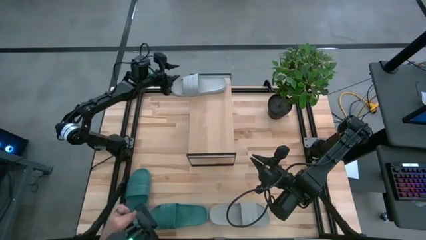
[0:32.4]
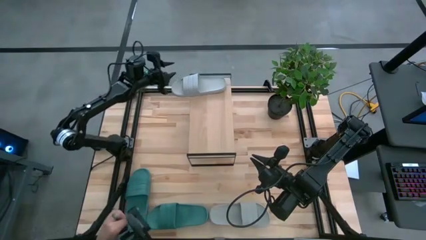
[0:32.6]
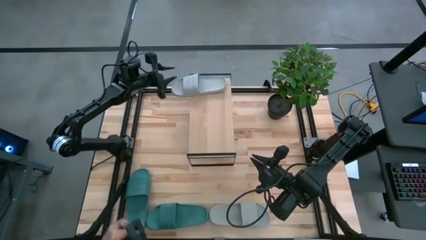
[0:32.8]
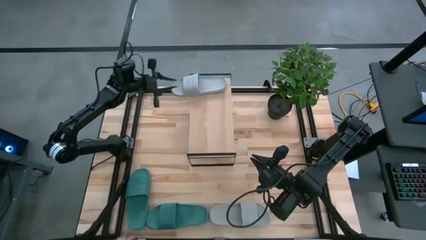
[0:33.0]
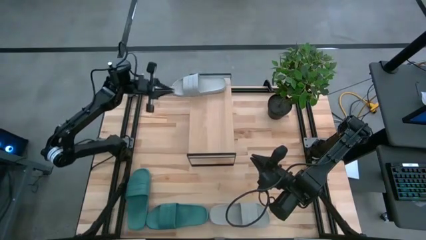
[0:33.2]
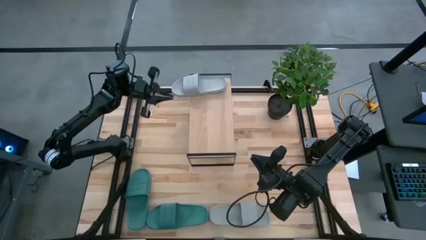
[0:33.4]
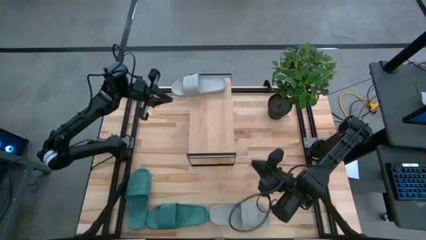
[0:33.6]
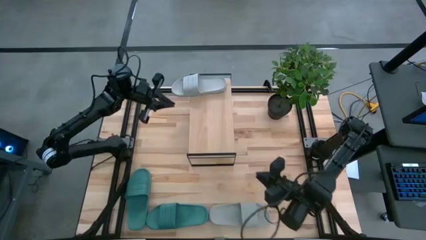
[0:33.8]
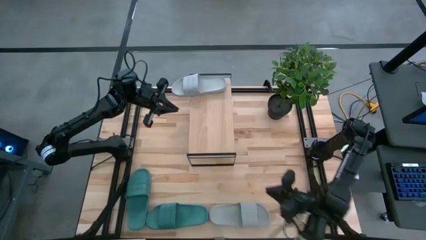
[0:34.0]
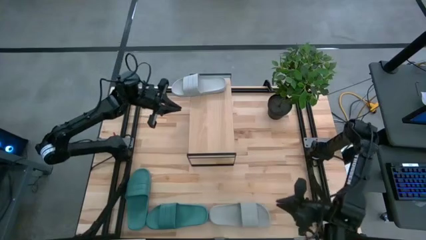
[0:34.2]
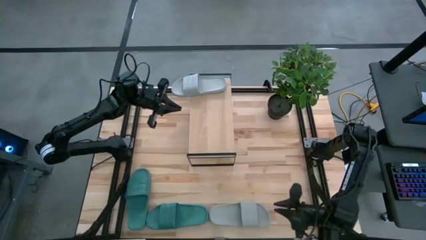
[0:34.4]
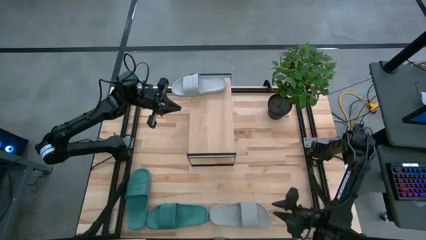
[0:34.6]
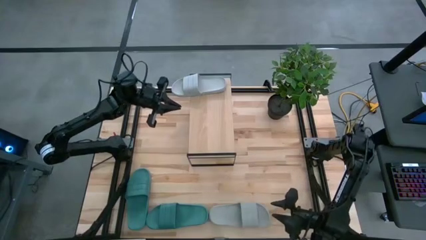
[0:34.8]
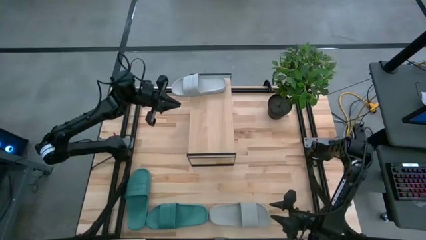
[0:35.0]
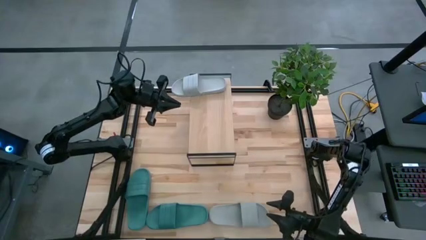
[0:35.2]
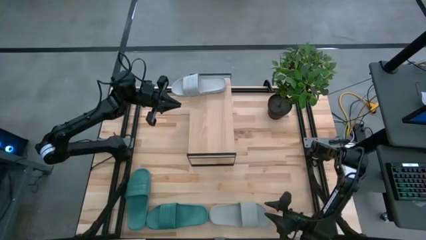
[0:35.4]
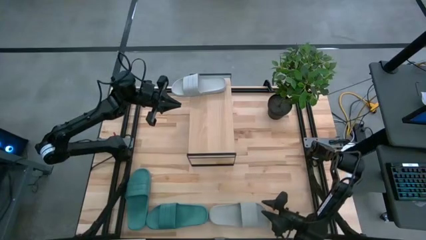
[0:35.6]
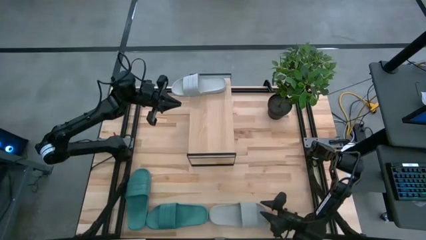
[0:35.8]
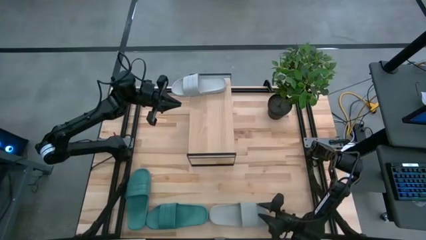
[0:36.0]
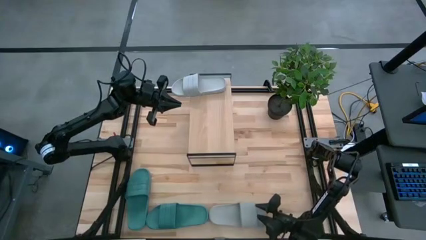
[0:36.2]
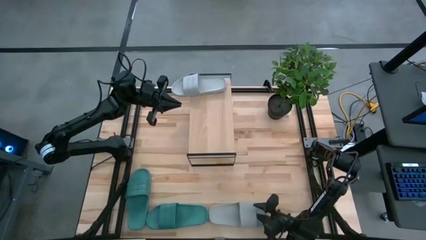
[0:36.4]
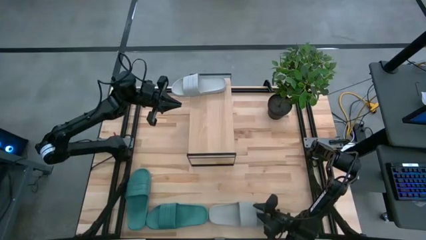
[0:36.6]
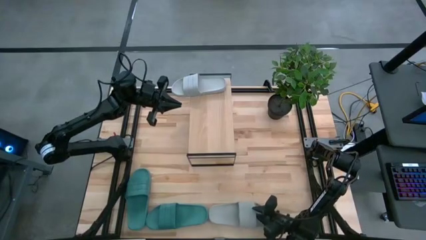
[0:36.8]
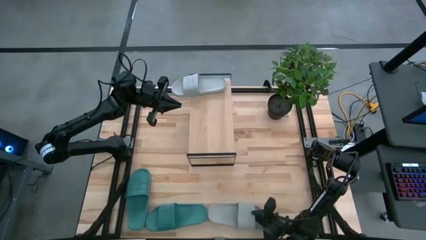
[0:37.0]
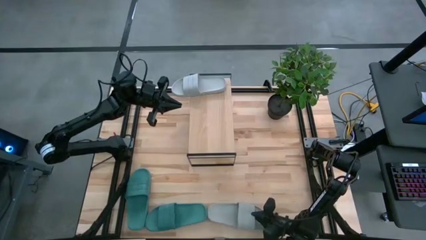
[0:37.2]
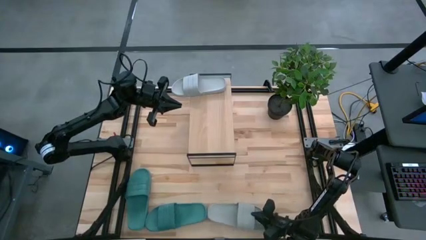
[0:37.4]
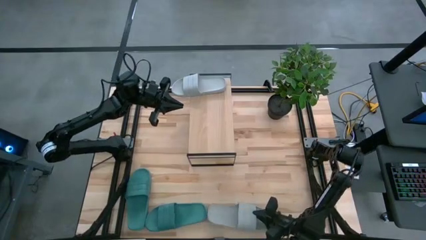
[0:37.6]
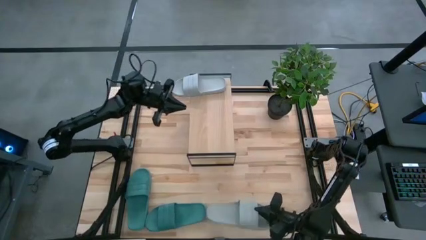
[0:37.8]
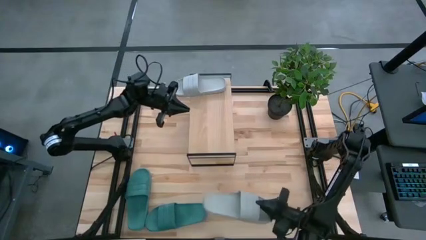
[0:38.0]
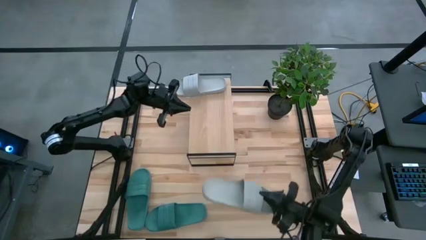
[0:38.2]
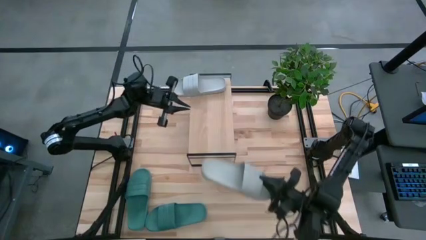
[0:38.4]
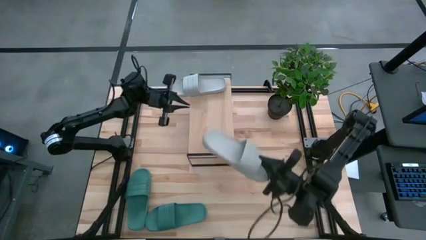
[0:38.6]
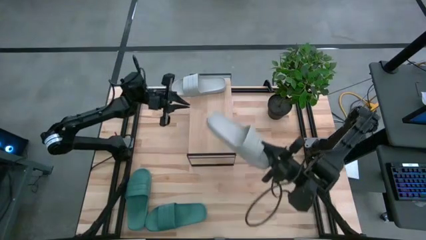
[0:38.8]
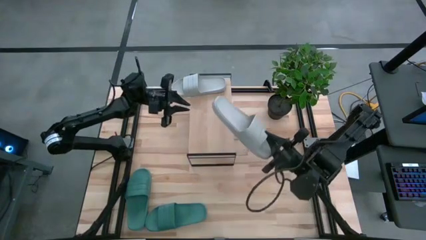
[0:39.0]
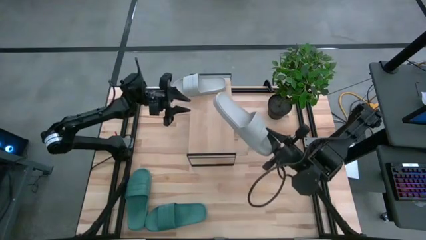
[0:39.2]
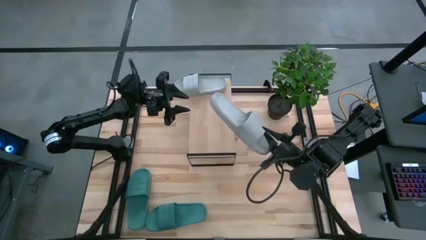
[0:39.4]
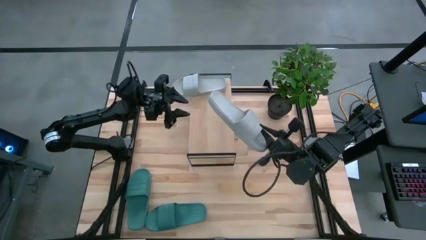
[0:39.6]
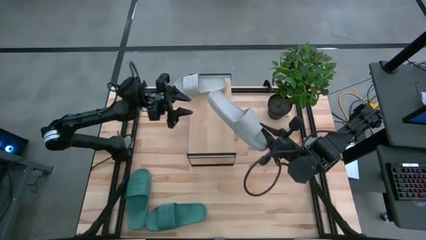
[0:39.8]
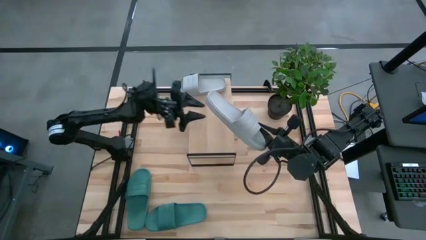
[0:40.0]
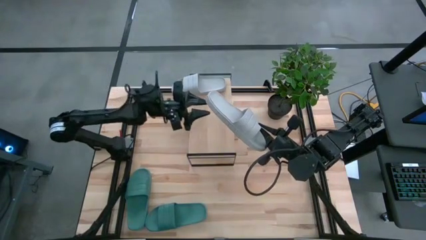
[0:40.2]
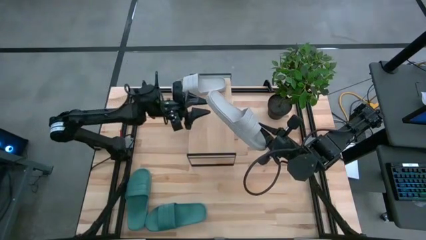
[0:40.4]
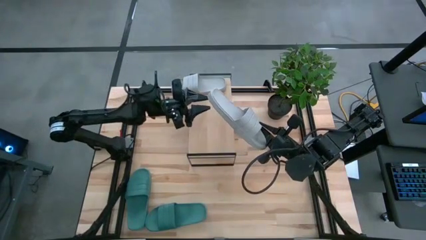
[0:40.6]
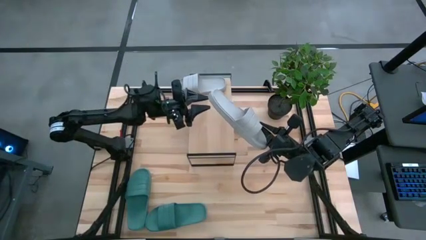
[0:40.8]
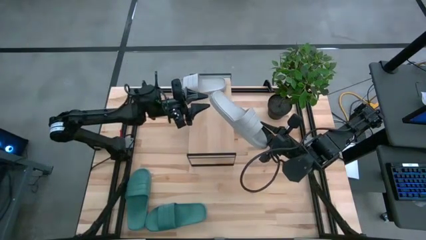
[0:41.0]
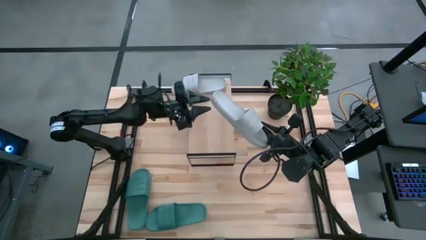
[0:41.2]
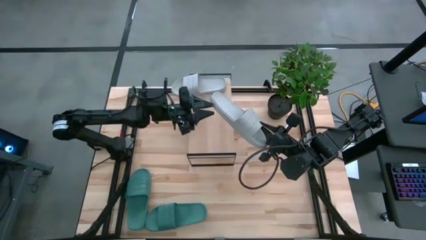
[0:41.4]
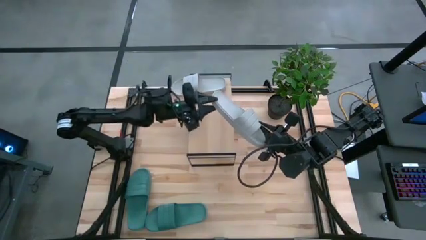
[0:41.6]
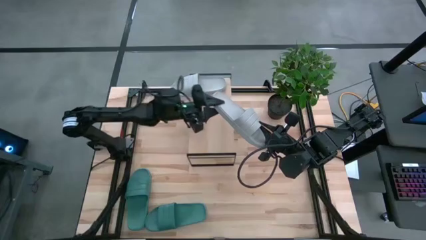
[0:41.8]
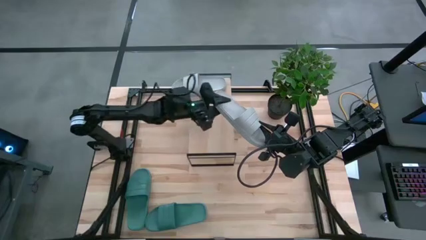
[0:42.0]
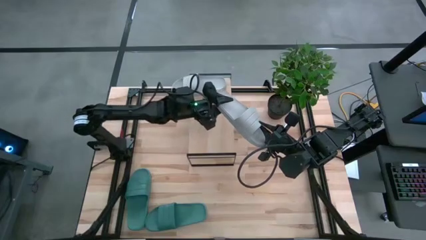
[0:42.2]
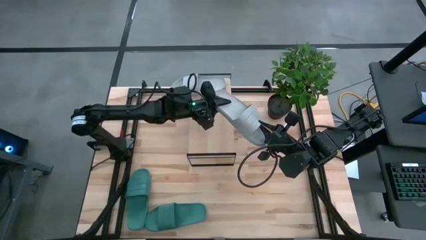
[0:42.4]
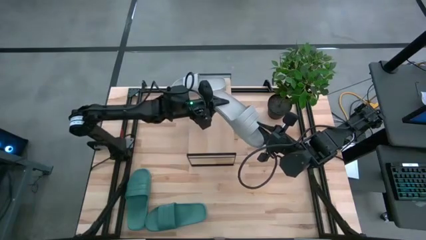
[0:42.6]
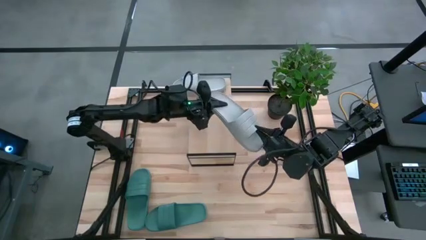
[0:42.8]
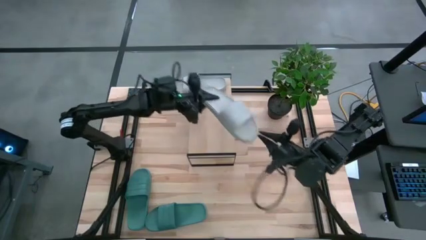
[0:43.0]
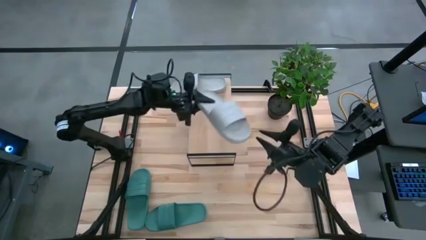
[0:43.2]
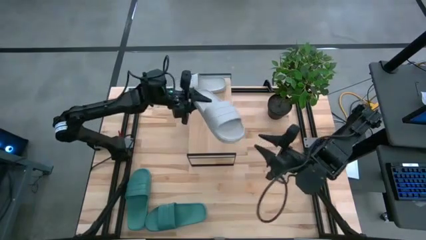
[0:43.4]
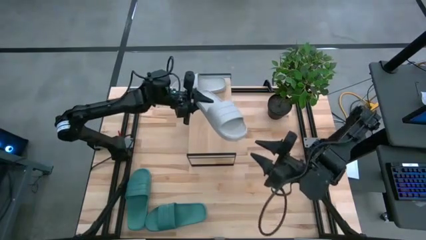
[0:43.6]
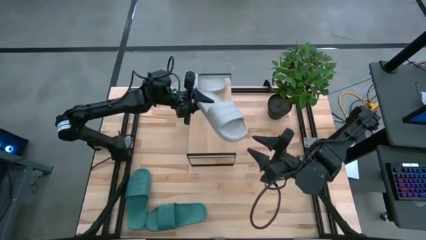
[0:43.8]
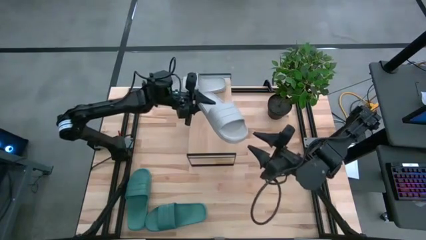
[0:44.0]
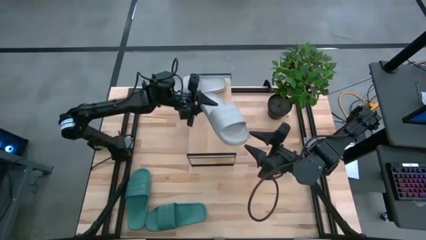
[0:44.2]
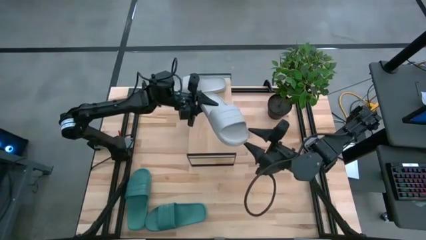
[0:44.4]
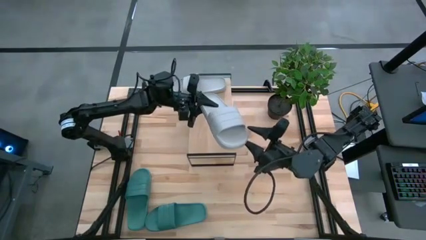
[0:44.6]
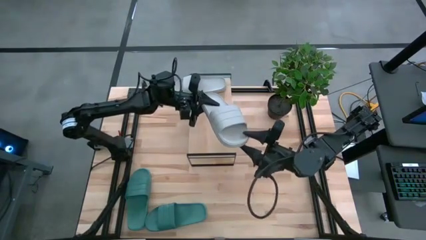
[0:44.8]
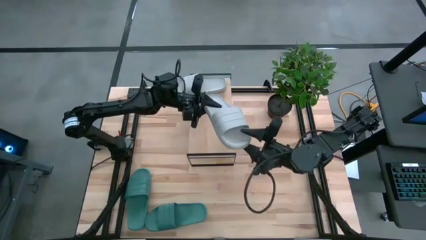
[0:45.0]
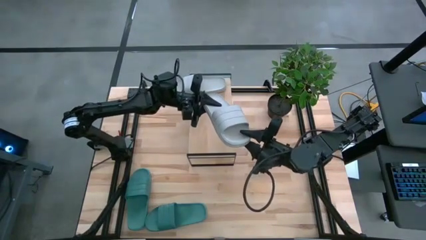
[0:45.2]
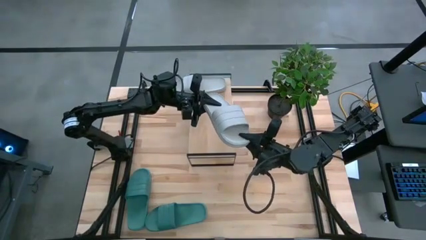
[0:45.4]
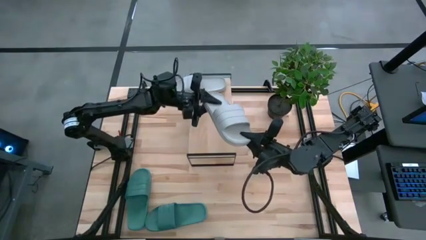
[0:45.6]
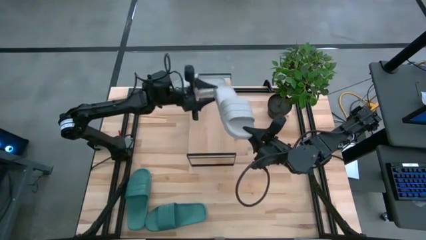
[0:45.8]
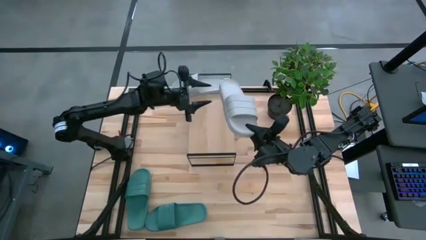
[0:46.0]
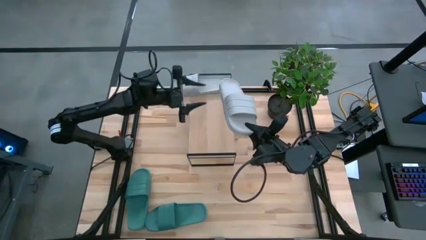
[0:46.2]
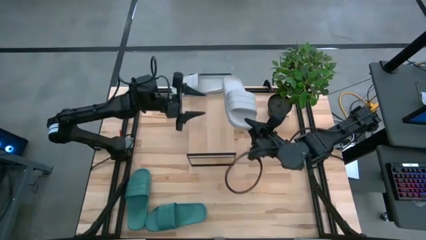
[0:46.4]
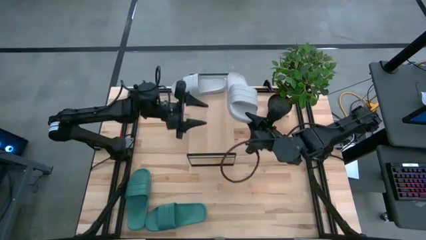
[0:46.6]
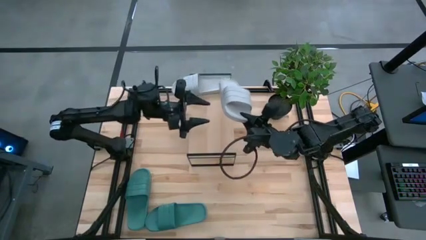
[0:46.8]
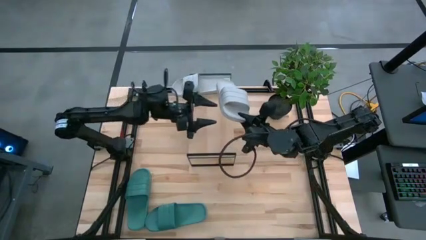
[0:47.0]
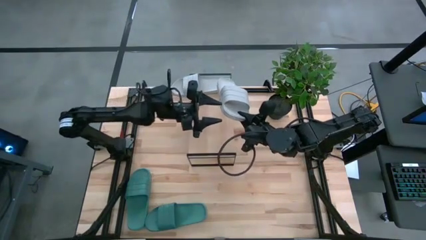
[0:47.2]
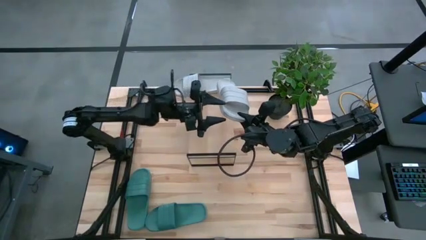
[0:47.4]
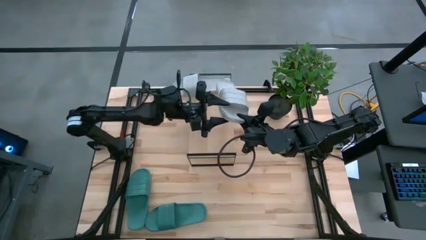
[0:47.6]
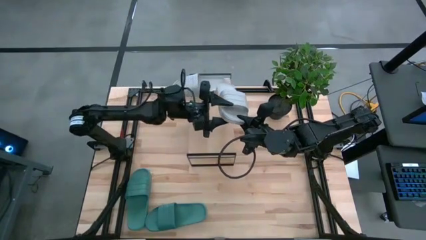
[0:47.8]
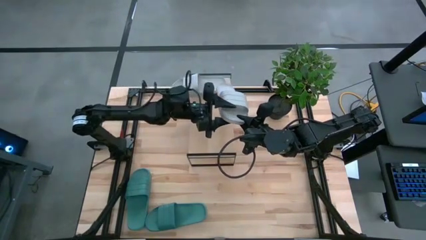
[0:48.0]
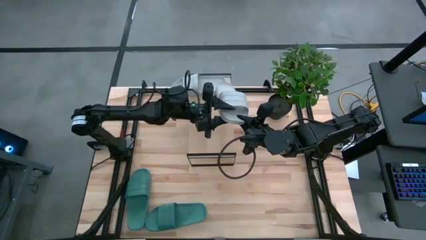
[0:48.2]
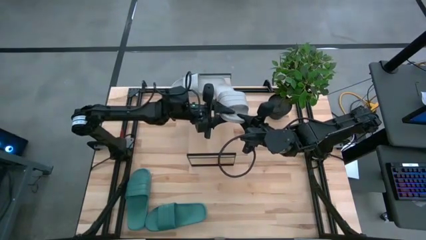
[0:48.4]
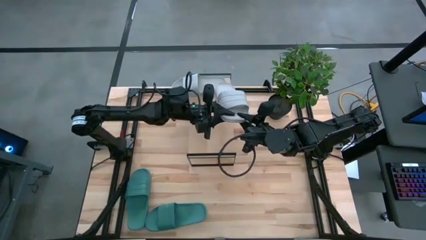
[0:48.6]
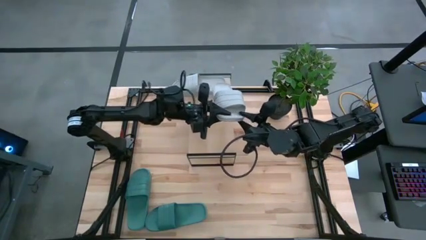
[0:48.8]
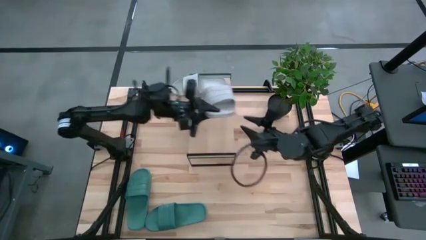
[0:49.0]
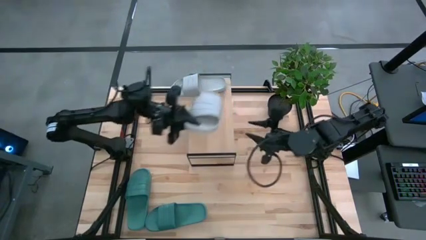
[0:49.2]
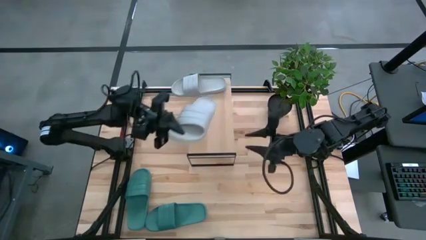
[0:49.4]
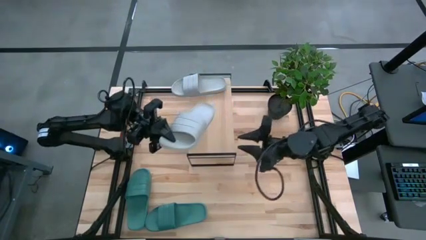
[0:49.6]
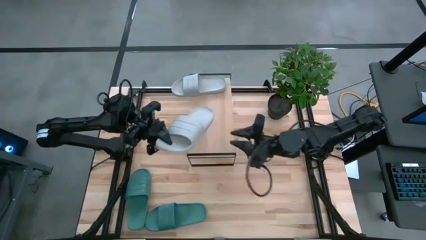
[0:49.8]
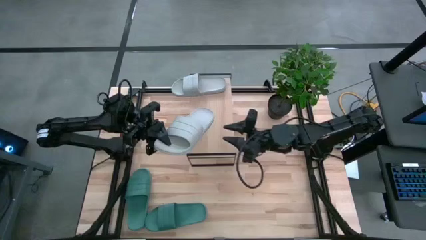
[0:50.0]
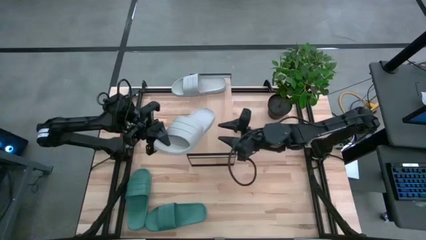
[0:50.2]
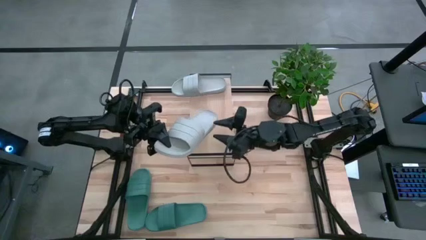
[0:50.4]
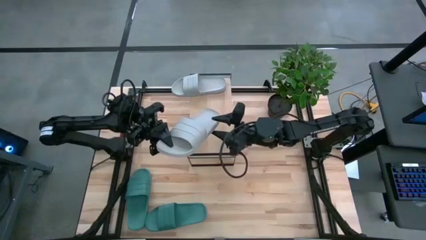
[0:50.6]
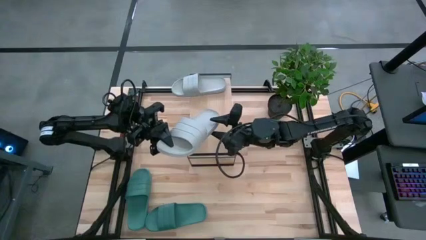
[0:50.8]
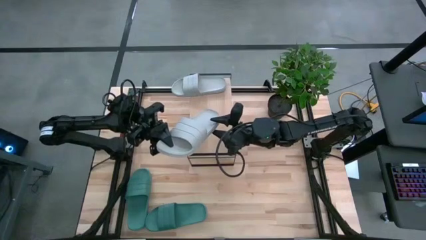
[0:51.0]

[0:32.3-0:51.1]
Task: Pick and place slides into the shelf
Put the gray slide on the shelf
